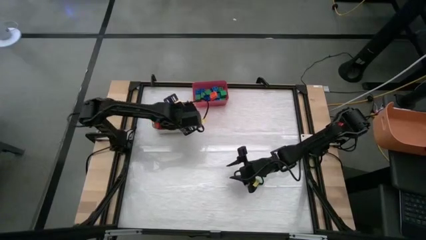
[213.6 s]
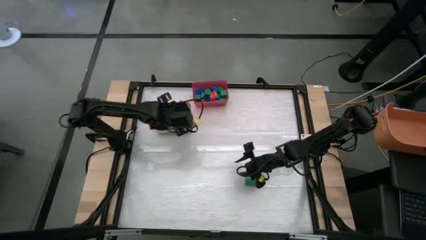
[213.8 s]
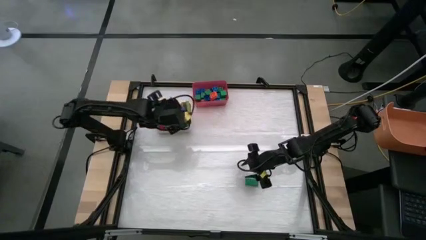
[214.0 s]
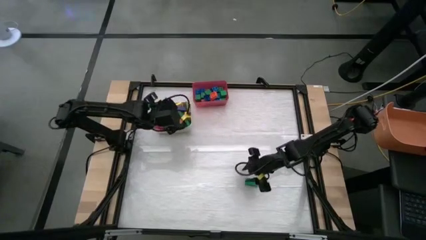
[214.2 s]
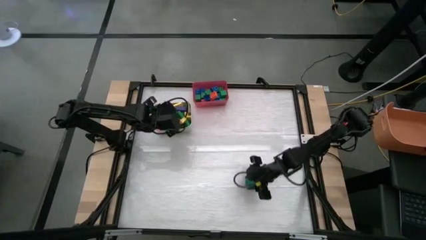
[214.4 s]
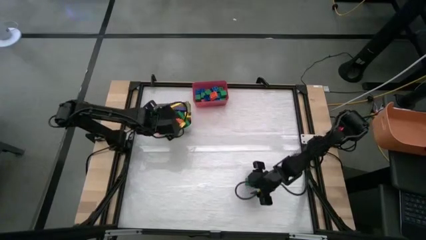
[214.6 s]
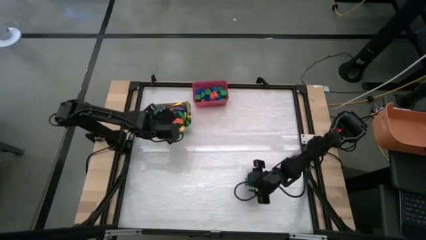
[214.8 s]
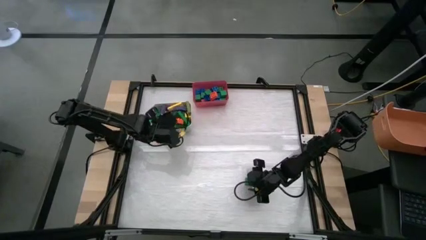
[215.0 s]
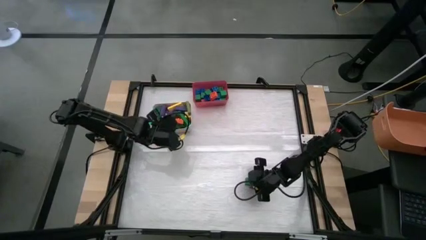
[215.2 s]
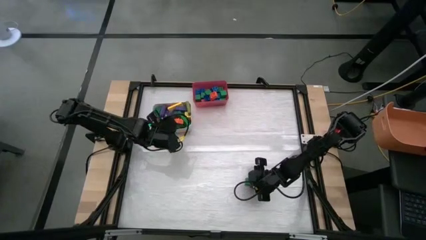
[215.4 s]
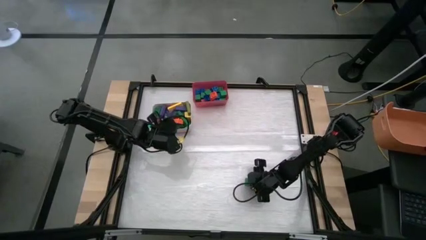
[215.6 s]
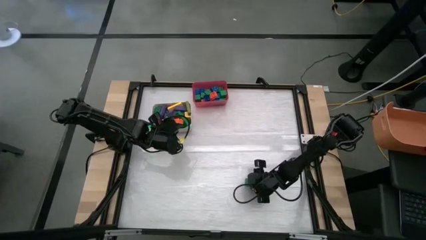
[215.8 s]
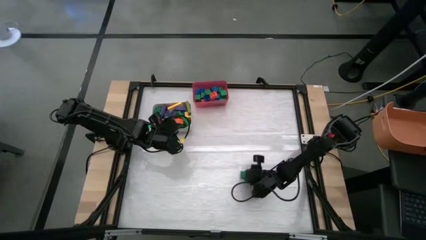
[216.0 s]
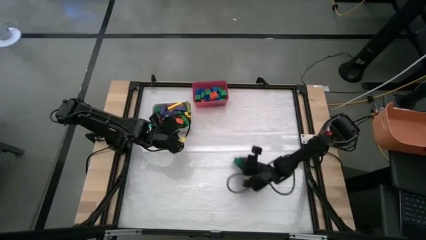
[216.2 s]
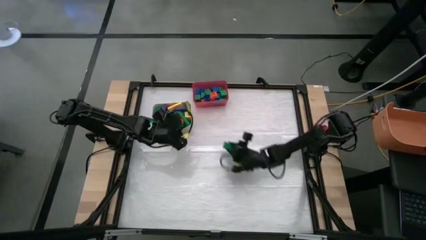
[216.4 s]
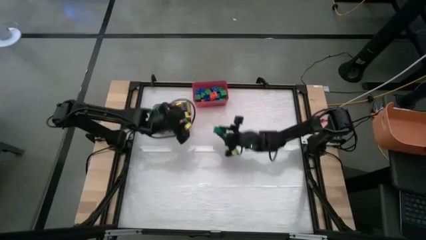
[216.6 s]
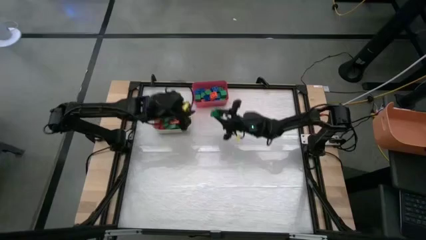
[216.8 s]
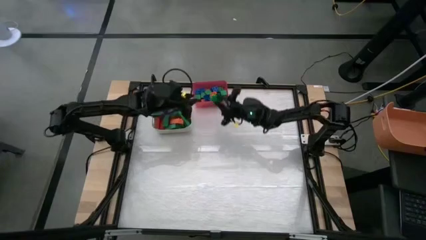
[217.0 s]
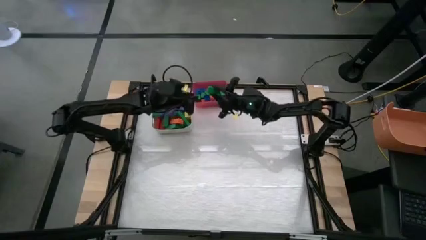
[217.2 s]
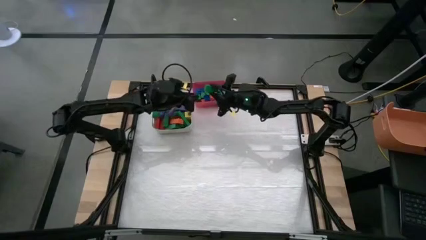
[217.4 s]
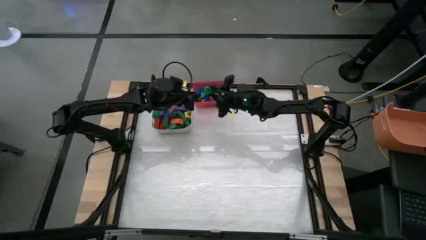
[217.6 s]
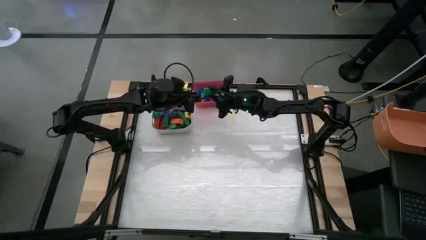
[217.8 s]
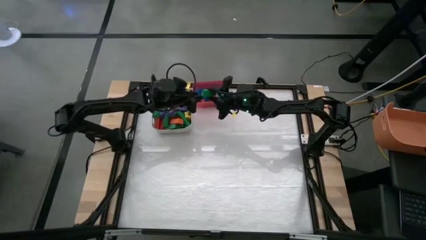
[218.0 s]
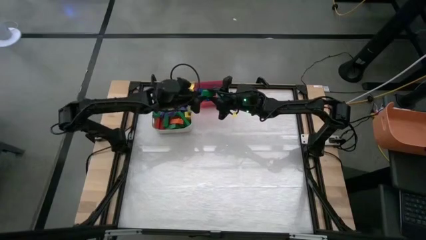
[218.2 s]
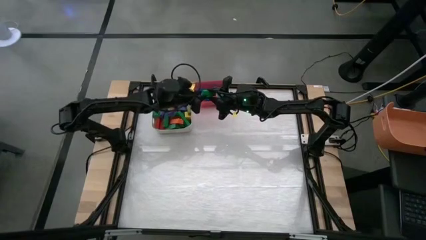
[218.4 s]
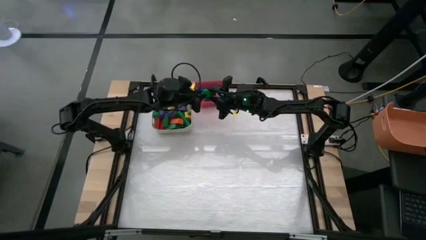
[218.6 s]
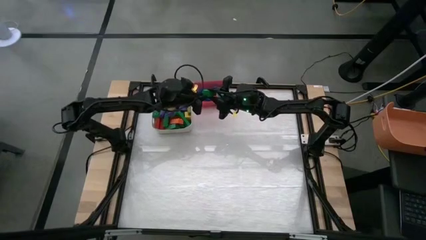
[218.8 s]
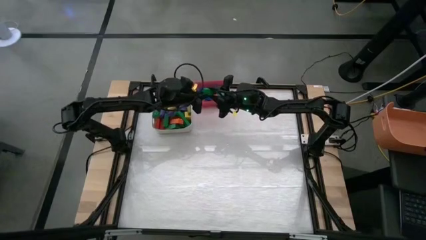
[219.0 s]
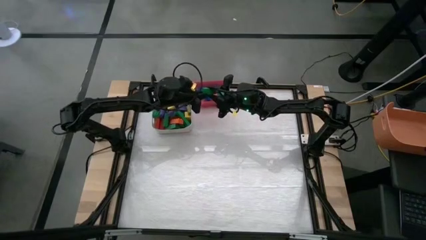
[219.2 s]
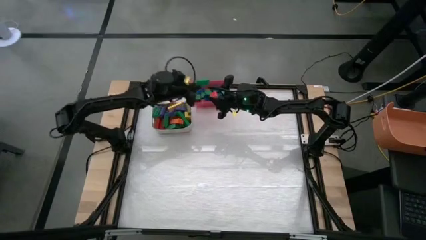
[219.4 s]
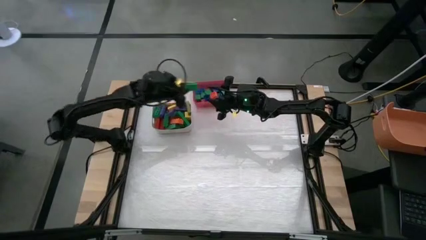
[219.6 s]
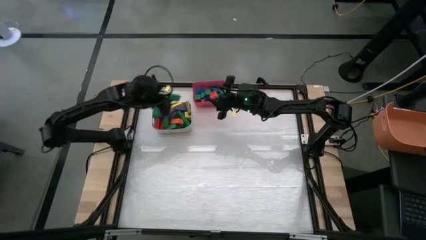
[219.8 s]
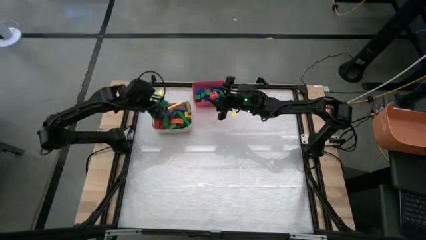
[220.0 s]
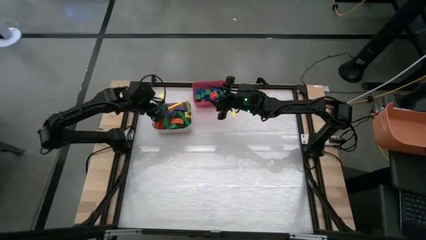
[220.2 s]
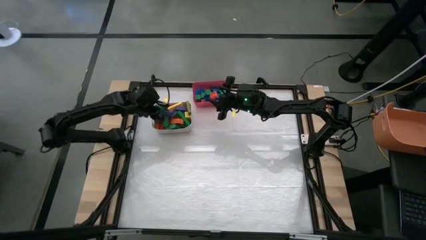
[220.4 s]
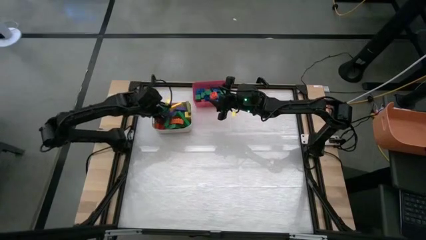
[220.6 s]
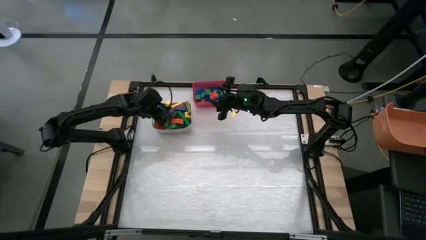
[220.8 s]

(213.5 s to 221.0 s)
Task: Sort blocks by size
Put the large green wooden block into the white bin

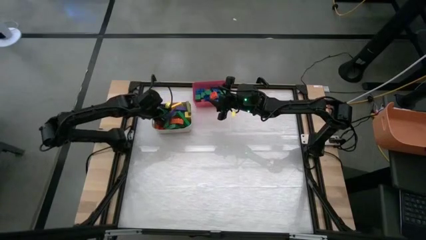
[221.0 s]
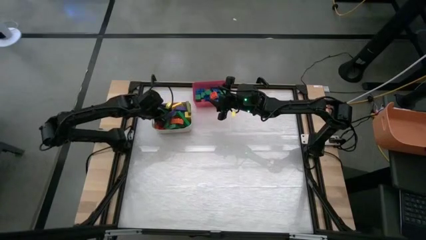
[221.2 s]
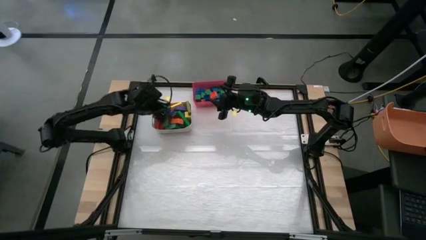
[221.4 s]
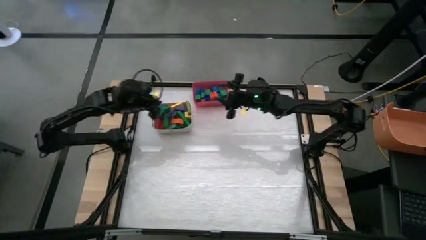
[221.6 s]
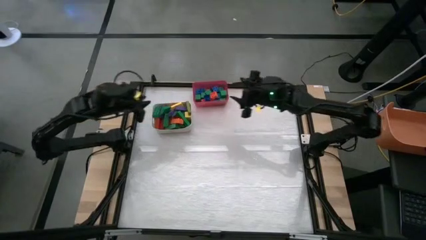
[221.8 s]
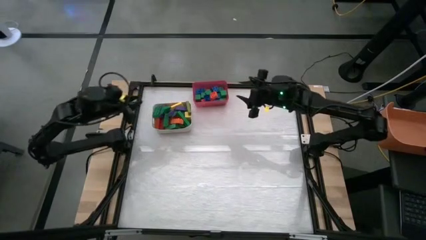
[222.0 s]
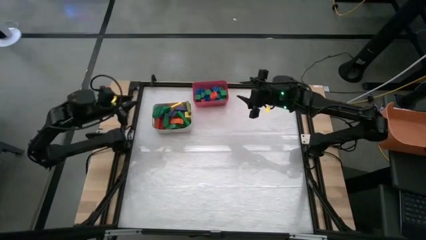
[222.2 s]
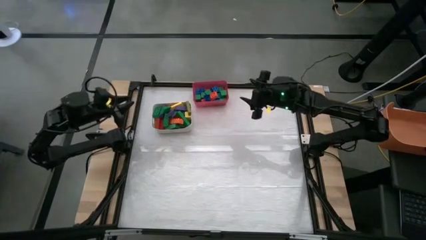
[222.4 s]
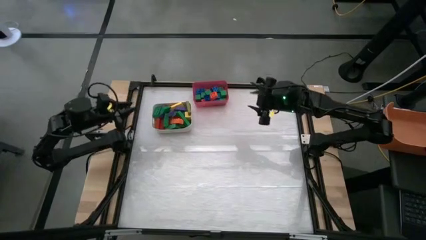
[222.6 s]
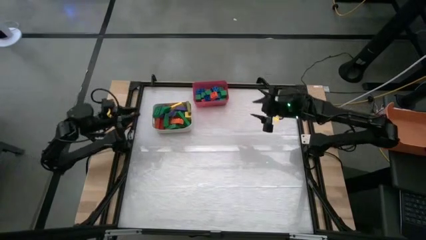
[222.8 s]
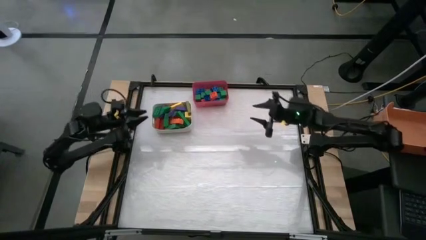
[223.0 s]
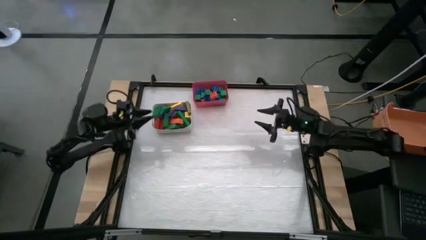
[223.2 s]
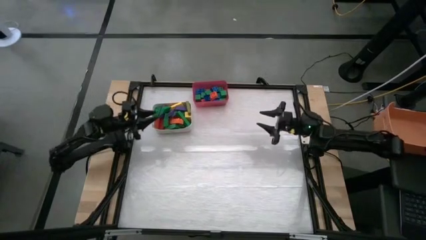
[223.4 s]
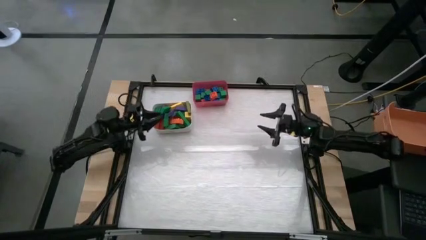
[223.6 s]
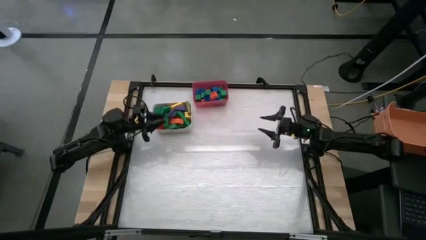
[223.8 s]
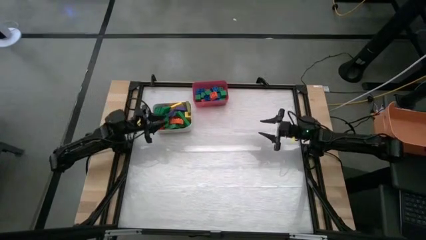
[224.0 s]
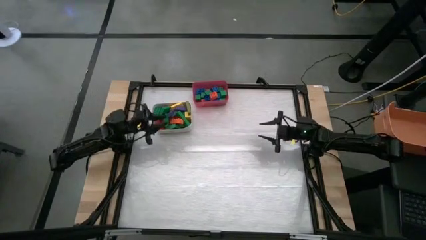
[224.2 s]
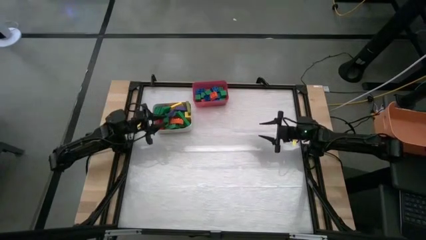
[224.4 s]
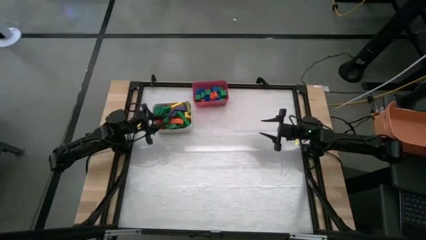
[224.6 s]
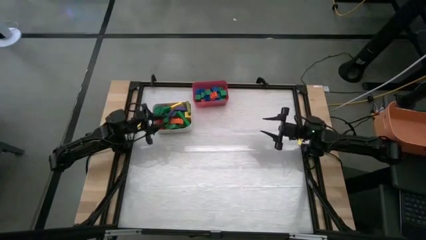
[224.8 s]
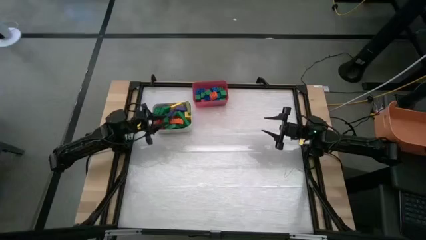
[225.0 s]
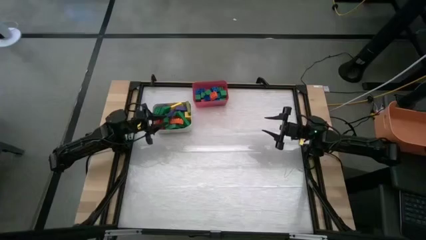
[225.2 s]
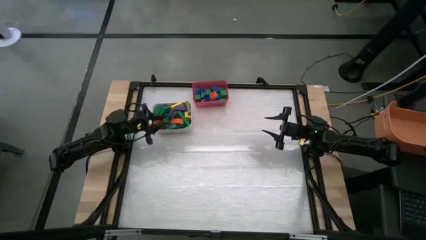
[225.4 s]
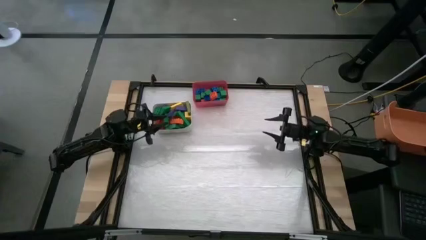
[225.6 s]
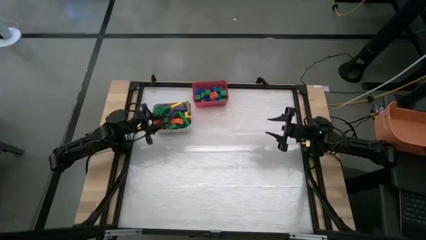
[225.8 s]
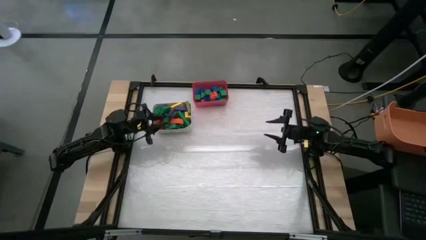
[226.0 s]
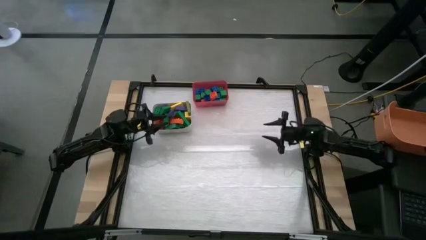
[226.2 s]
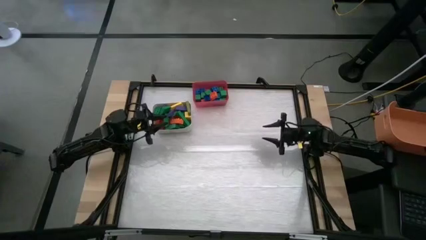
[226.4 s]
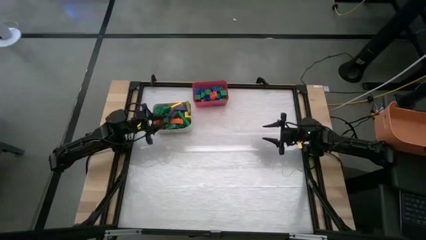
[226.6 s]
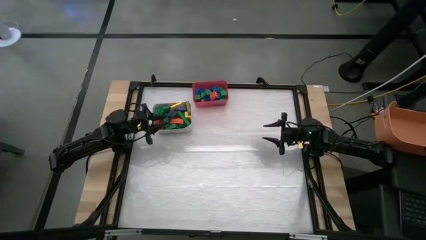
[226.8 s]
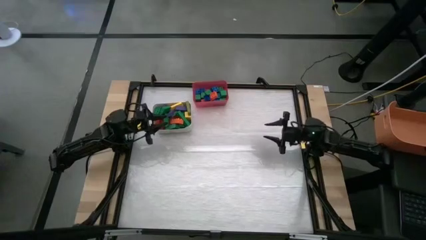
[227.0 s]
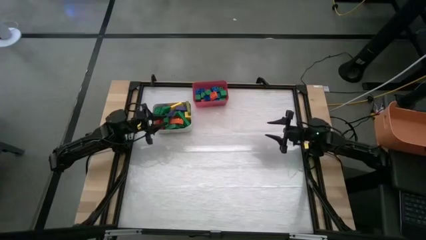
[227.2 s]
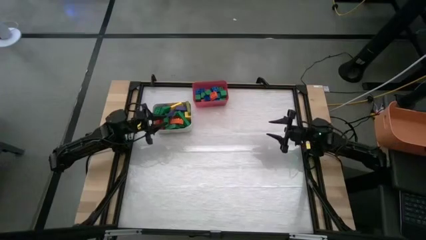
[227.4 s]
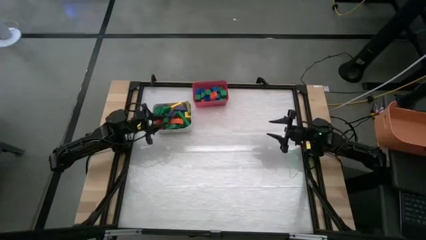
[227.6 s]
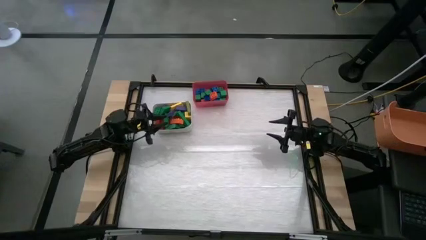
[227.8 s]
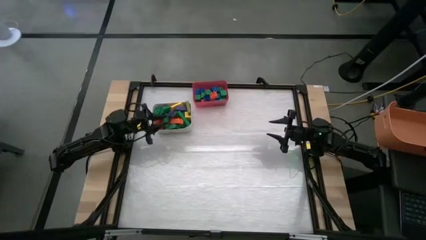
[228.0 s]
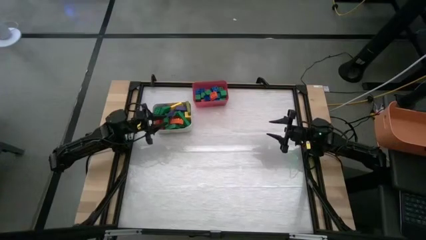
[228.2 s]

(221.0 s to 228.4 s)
Return to Home Position
